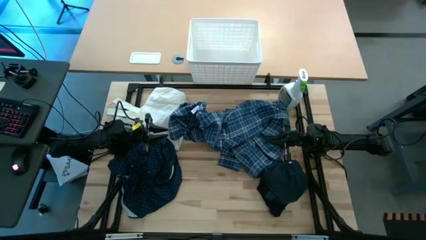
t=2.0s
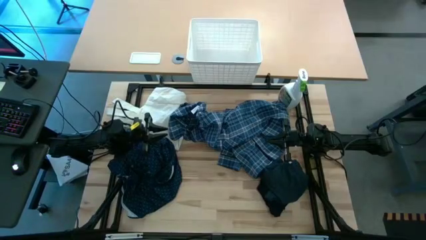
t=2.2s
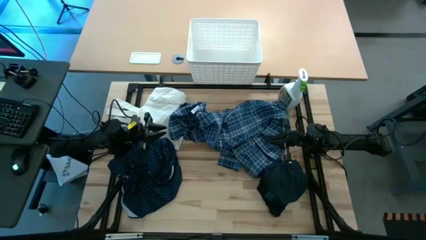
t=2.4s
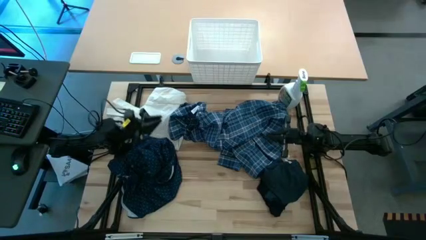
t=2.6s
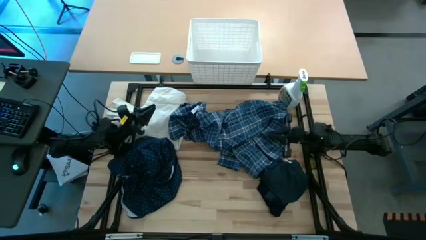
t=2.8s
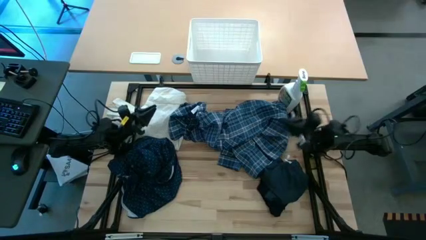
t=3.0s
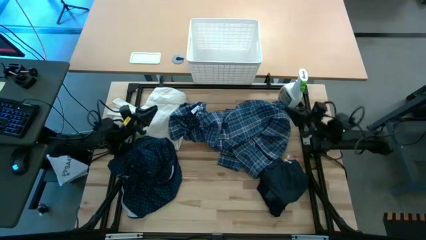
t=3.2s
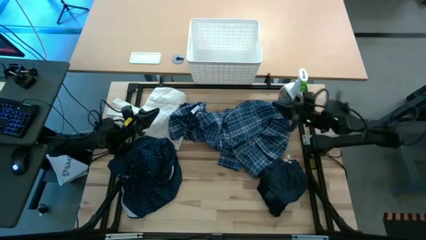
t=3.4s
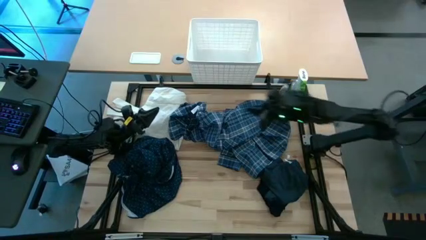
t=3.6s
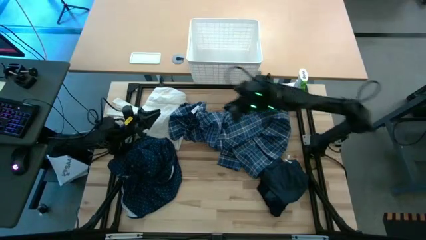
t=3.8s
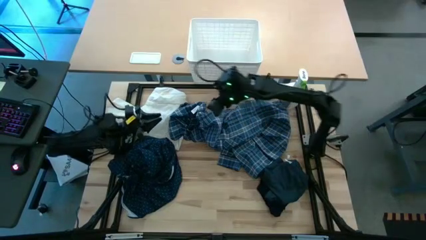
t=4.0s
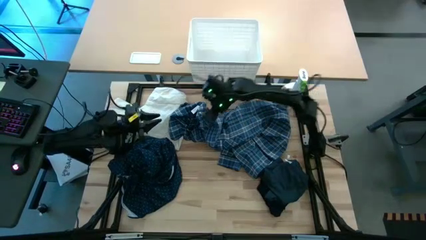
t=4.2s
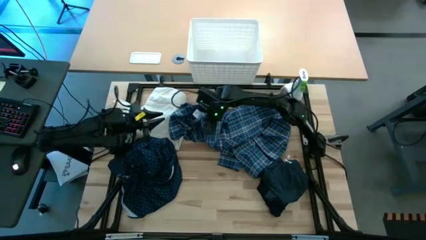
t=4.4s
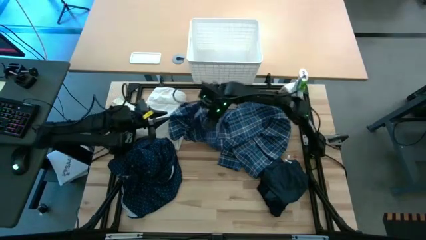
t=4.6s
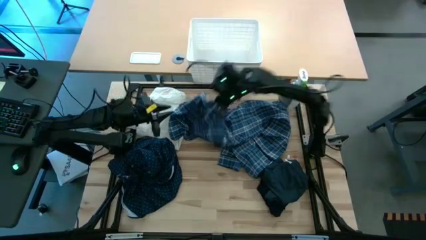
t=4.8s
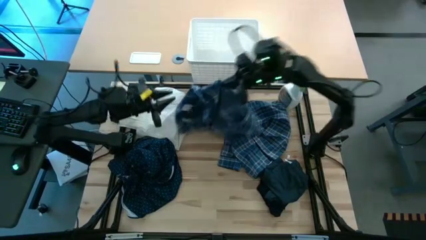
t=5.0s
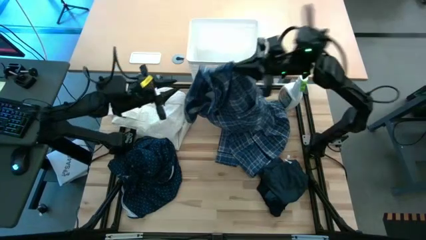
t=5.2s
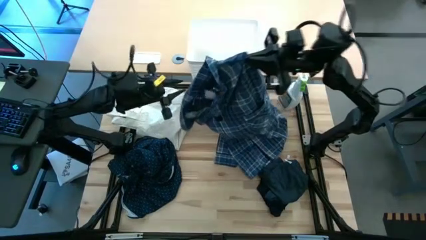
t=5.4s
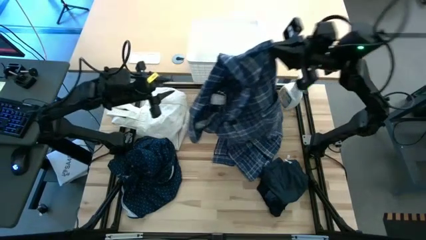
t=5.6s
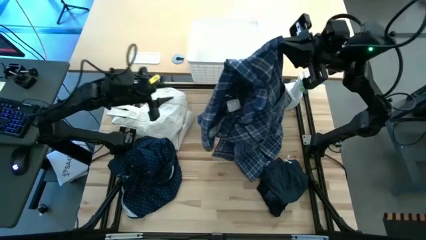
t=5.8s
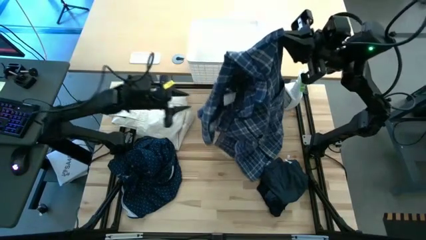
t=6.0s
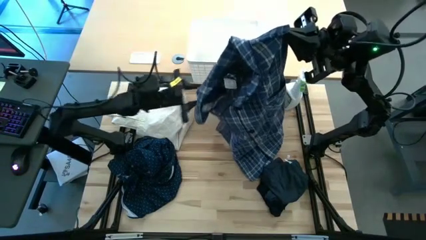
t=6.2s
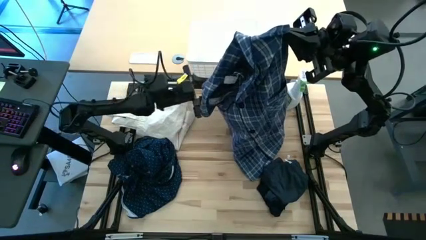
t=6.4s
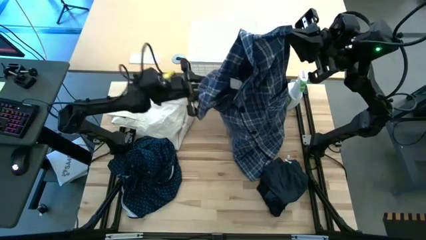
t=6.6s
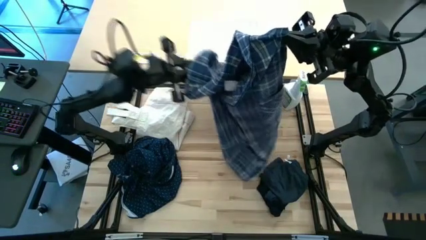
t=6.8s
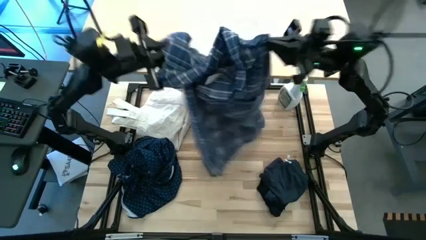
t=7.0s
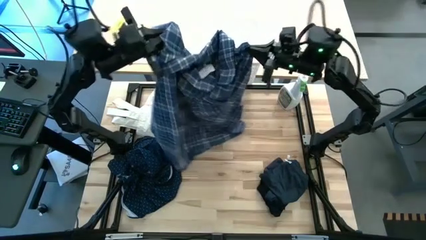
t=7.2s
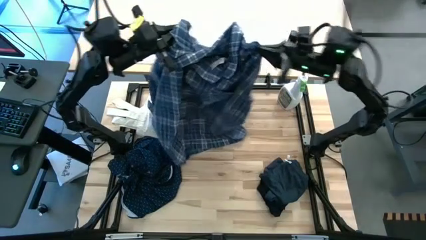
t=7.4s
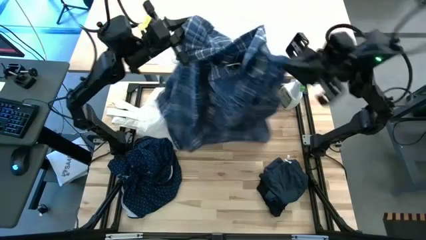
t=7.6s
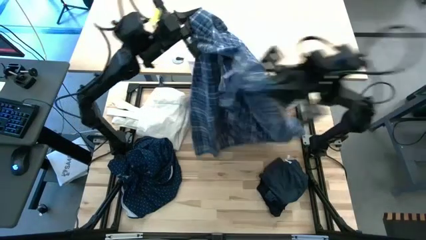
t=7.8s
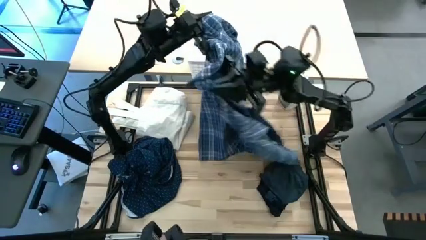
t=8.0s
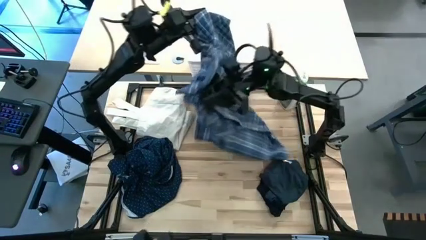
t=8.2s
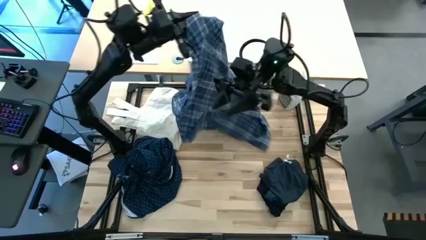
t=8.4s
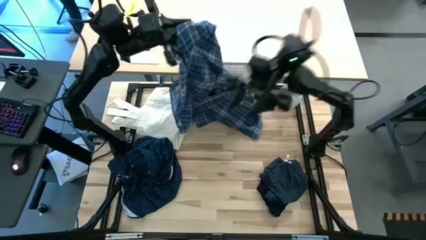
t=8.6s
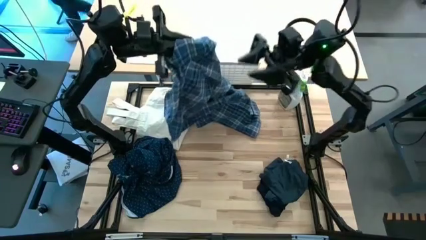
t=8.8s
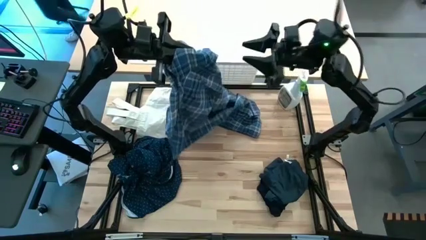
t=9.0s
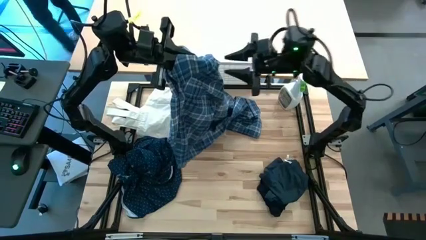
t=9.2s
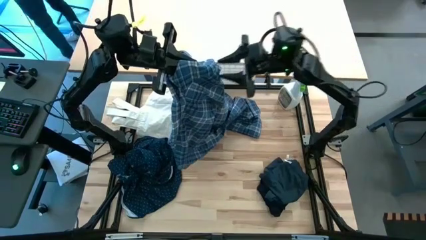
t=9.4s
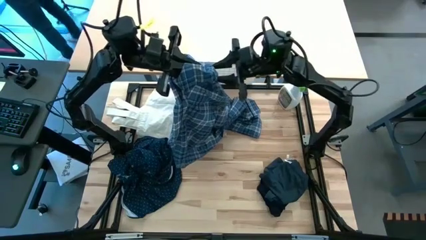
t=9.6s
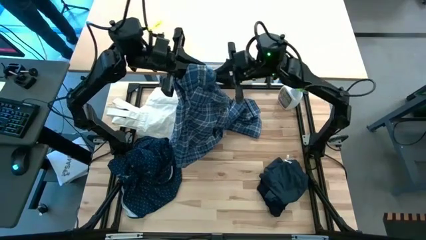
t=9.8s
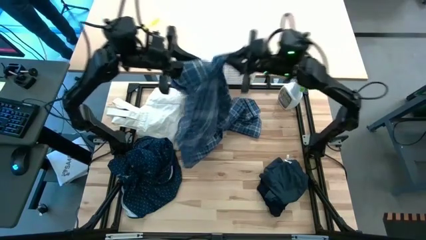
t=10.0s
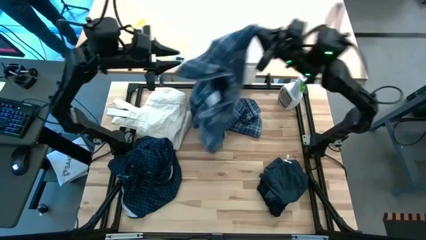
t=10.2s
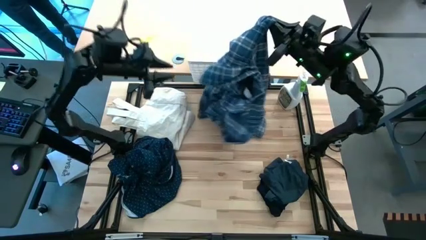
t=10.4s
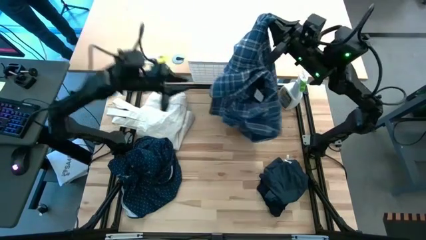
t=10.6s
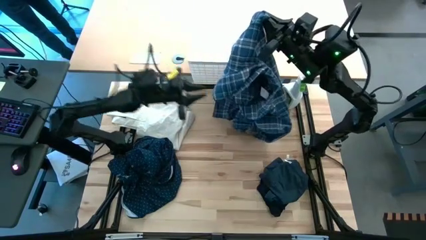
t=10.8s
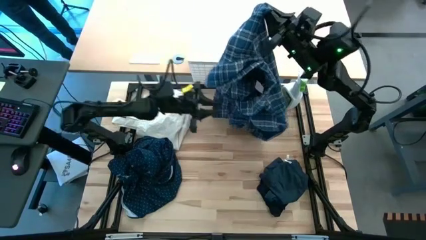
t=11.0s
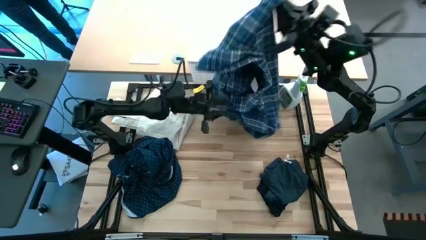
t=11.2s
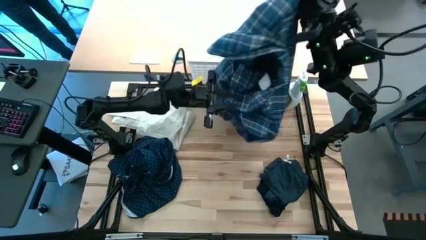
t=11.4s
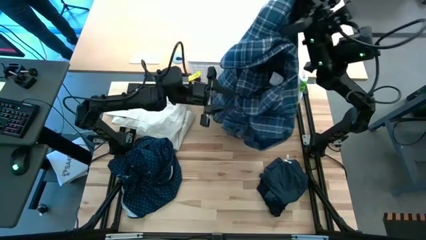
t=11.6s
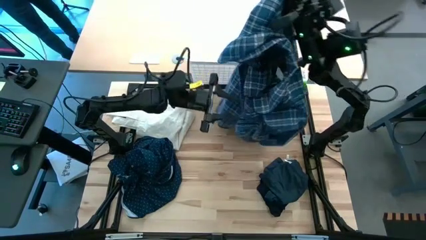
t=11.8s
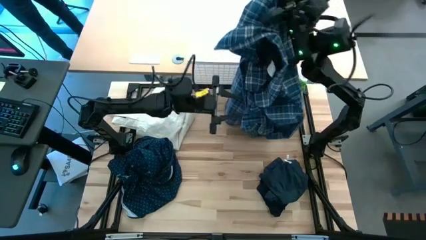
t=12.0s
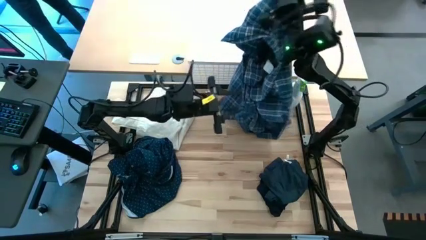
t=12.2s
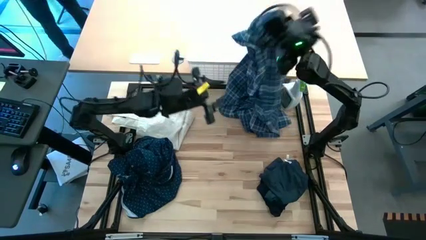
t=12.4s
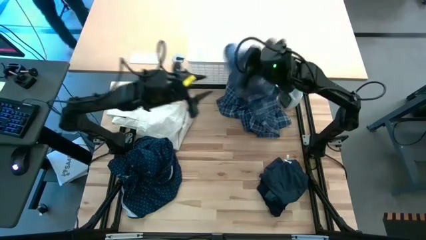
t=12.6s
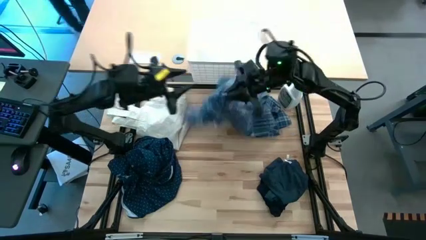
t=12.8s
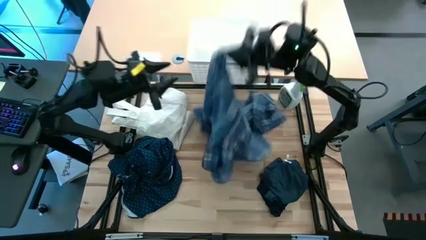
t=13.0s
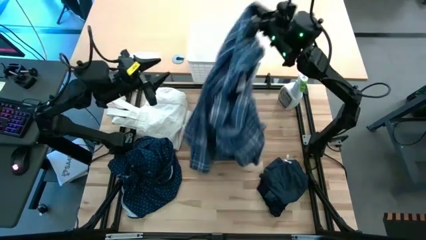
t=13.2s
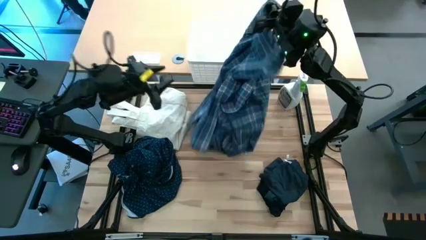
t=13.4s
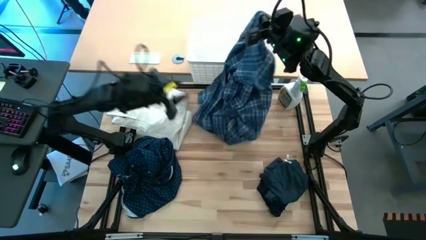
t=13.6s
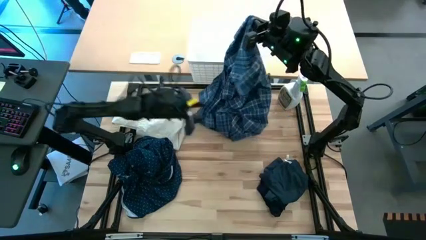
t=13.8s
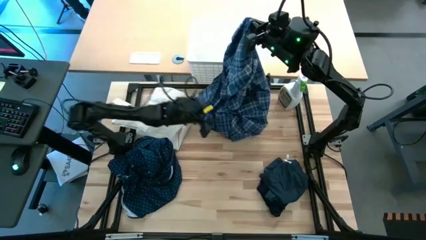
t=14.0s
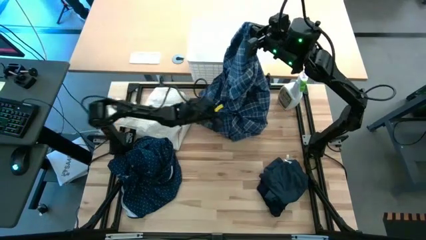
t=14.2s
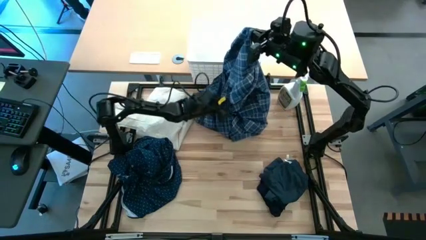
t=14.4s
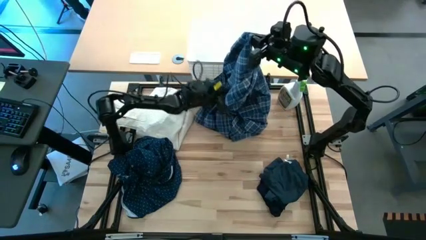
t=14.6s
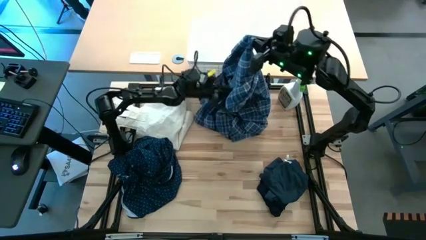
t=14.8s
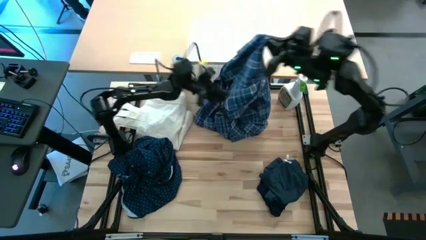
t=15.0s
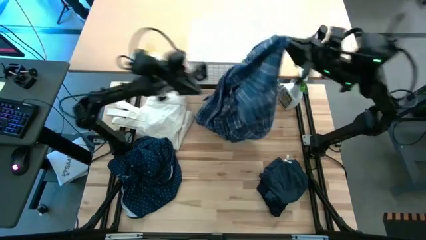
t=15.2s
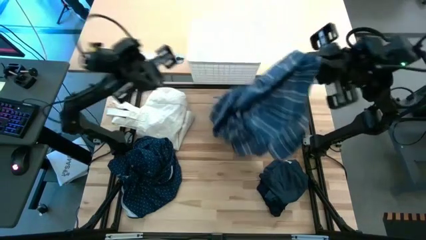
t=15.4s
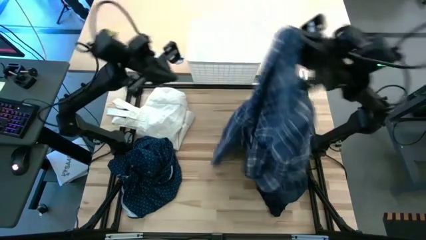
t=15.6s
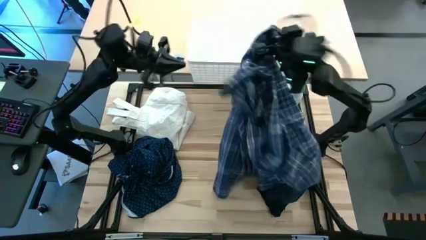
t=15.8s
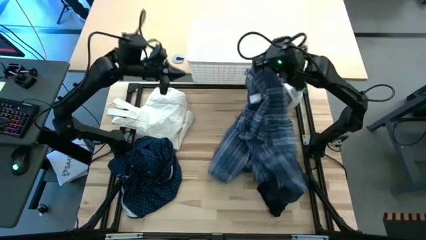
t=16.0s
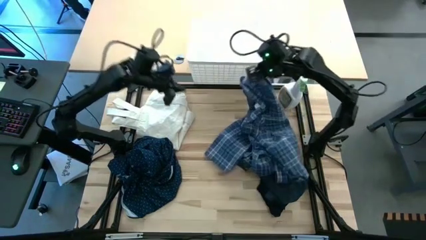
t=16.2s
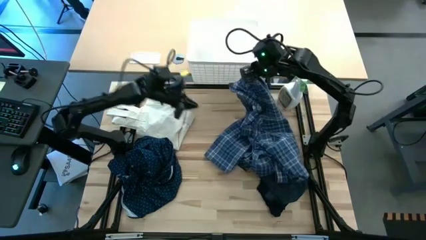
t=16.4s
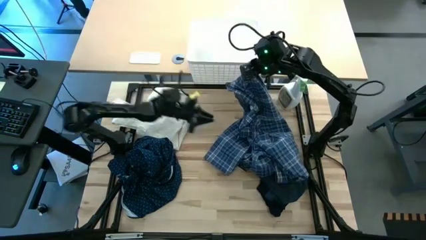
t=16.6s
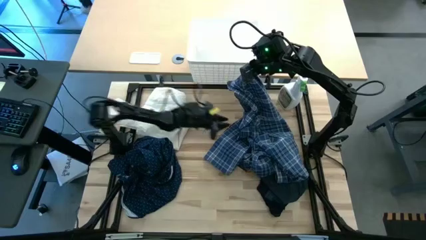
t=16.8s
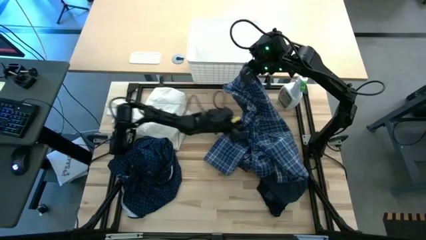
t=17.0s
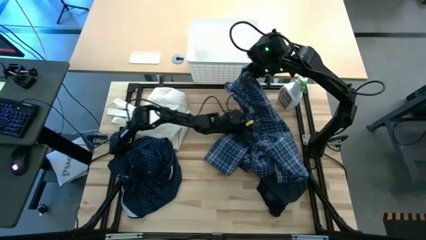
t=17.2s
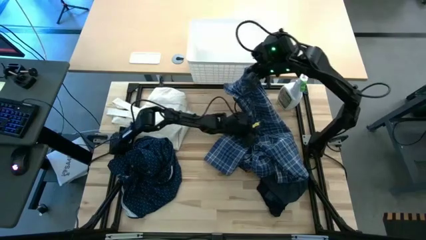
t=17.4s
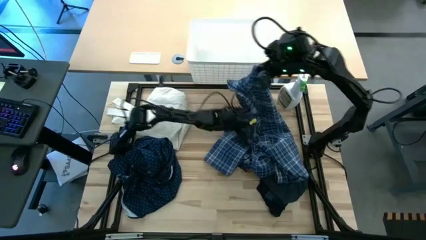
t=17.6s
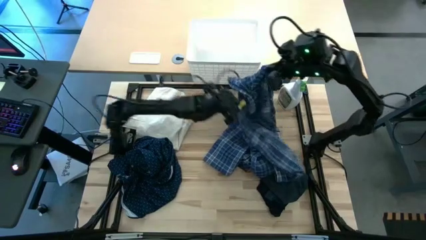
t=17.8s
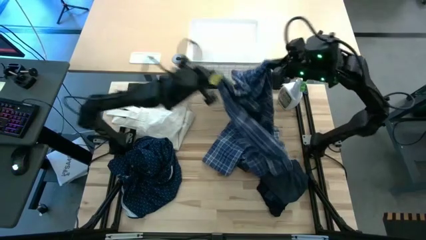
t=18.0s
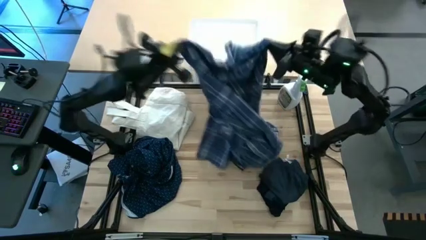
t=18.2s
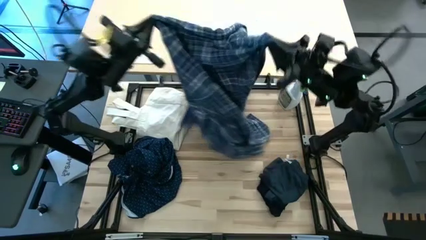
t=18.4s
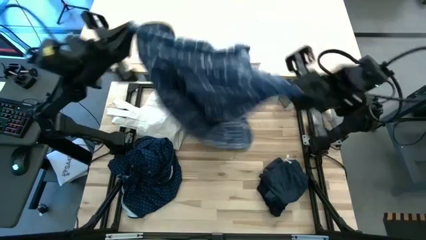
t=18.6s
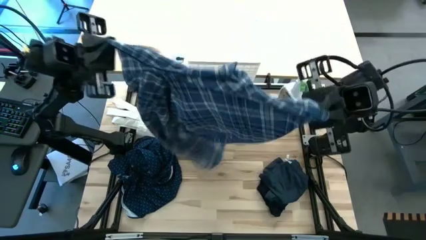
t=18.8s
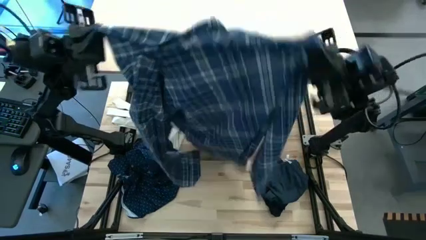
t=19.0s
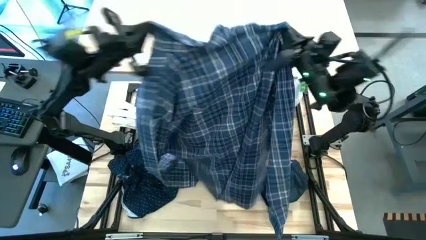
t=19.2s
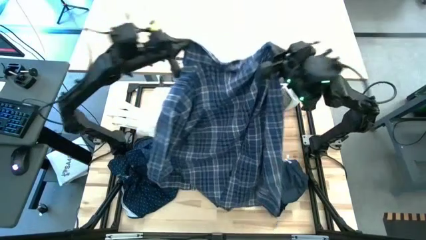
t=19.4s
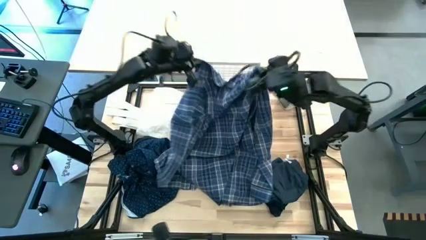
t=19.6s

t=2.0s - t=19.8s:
Fold the blue checkered long sleeve
